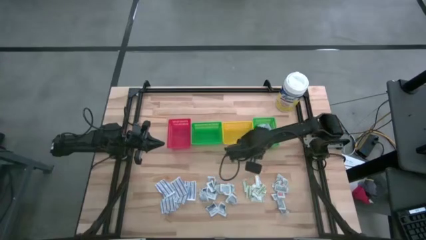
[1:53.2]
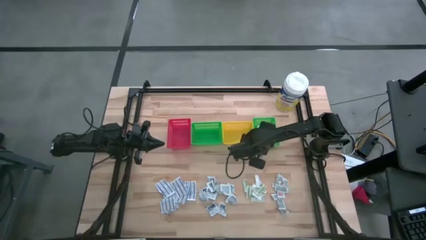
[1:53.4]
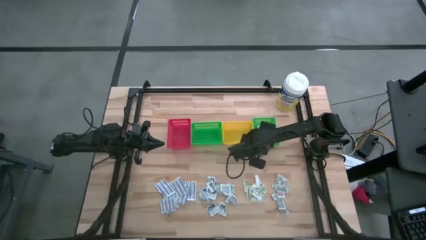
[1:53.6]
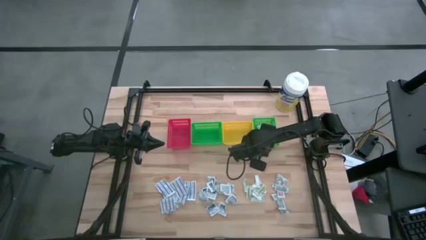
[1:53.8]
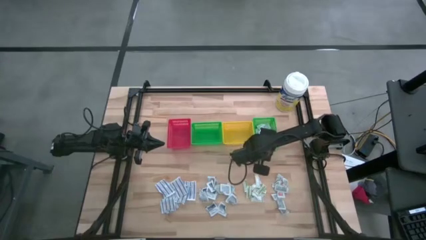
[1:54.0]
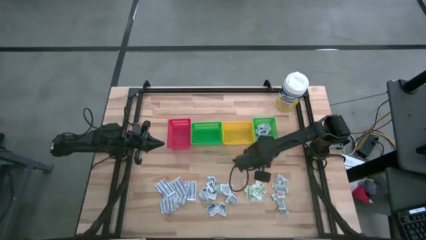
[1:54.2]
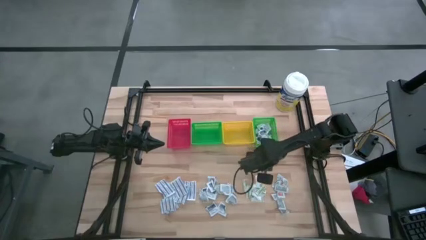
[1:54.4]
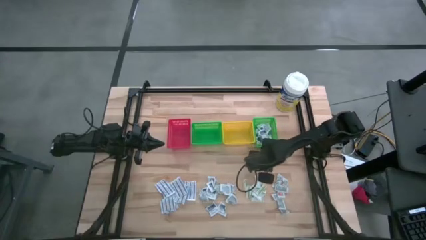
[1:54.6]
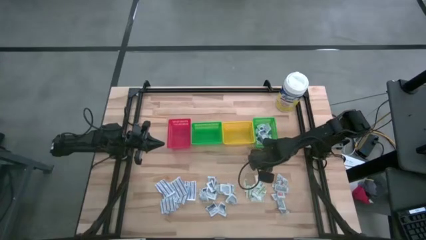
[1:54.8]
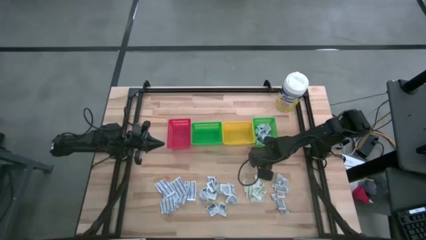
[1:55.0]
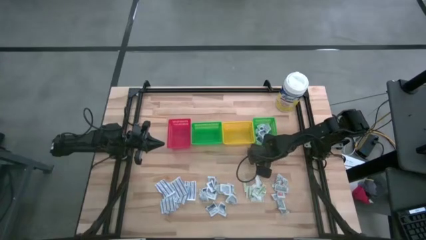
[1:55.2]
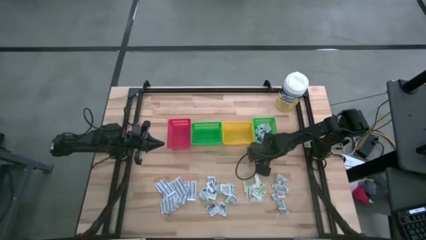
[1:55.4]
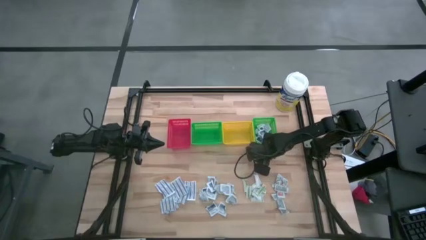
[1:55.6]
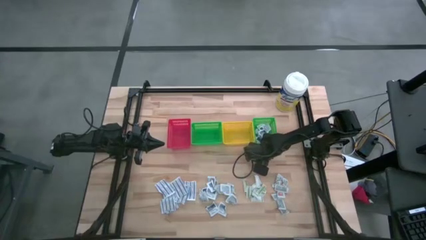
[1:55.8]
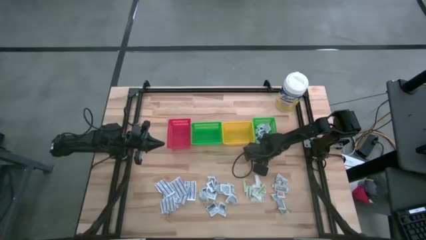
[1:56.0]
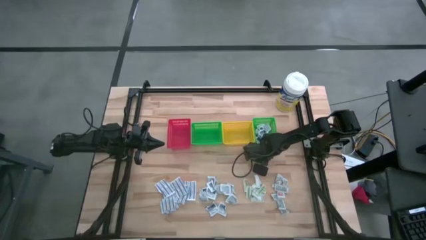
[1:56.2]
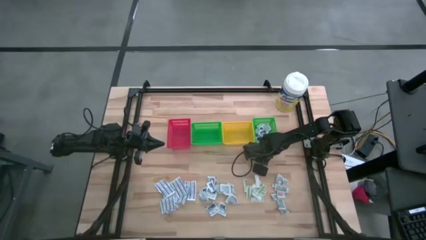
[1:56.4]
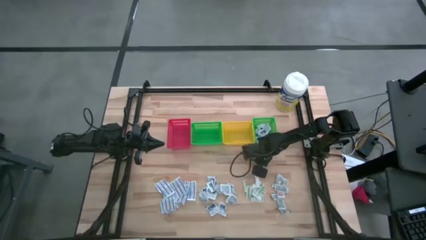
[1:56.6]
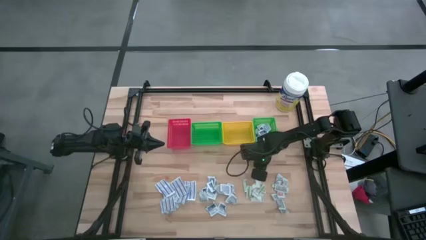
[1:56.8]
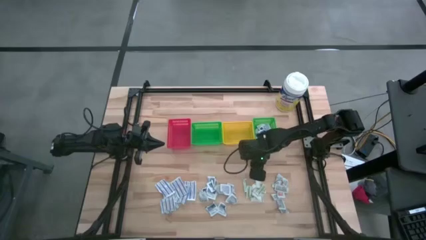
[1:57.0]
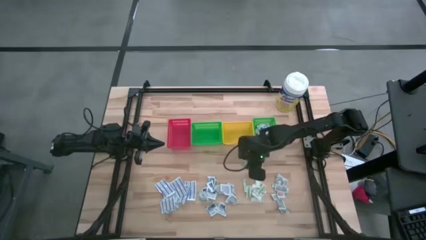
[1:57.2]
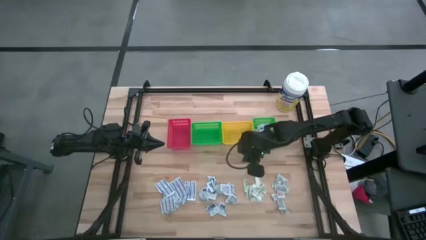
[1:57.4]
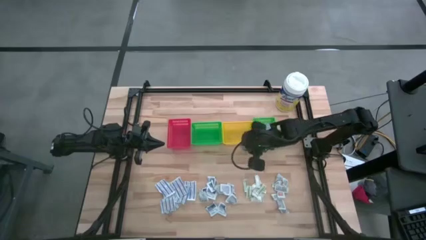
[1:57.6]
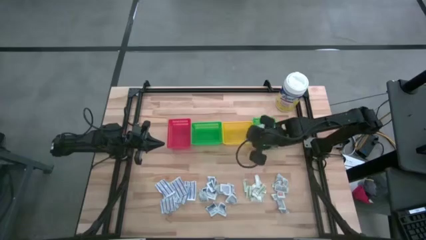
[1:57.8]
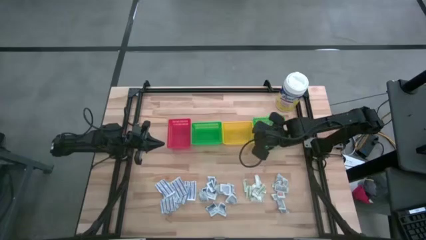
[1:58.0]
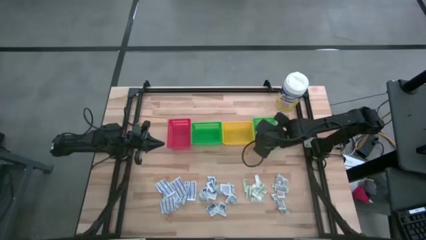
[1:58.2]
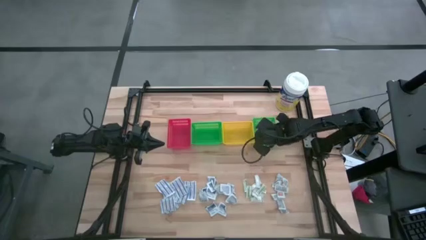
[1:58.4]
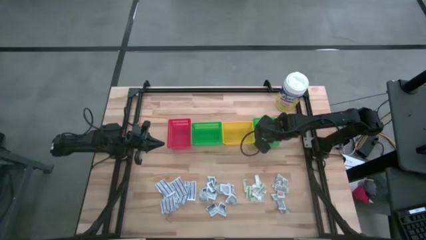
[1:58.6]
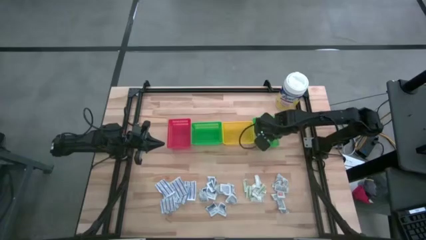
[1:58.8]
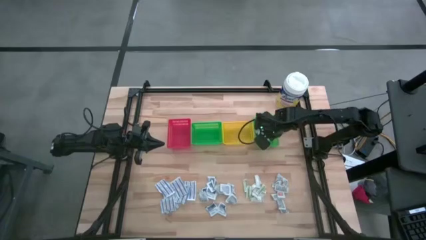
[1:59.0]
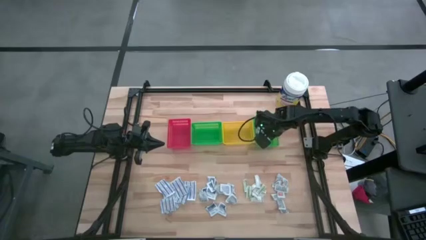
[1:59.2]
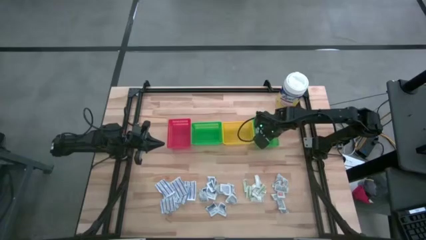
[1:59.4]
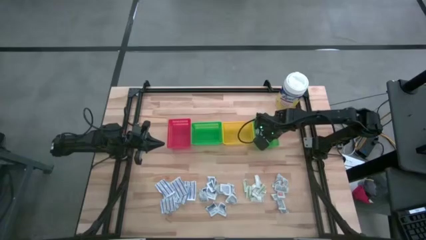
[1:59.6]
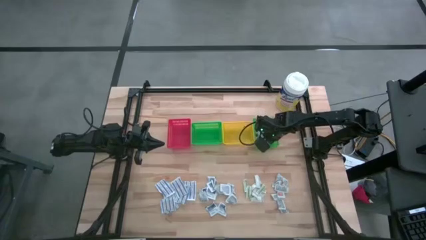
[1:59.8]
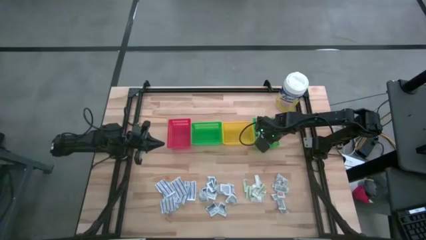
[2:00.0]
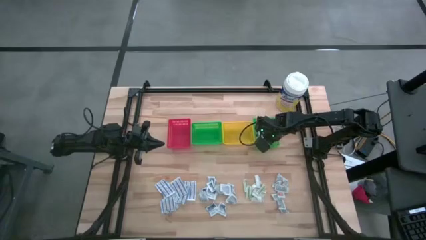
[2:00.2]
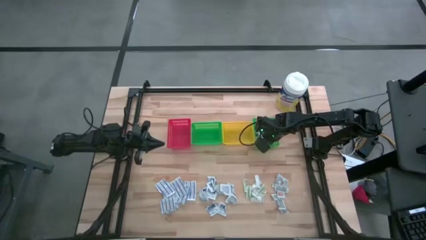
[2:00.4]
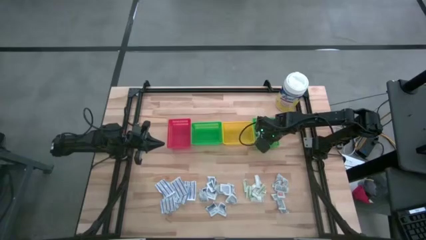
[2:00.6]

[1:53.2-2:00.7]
Task: Pick & Place First Aid Supplies
Put the blue alcohol pad into the right green bin

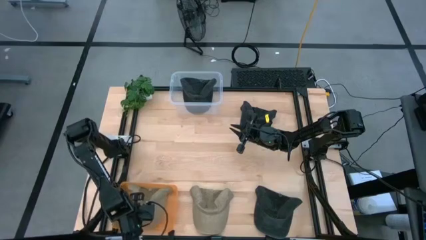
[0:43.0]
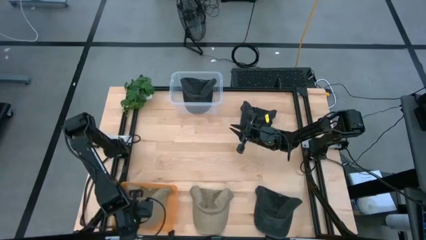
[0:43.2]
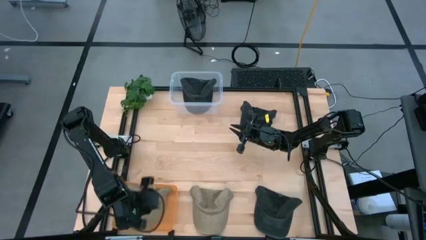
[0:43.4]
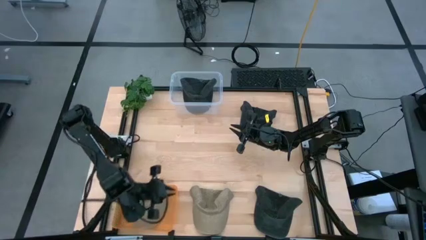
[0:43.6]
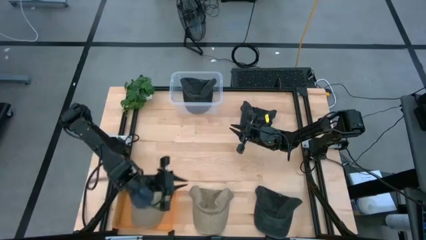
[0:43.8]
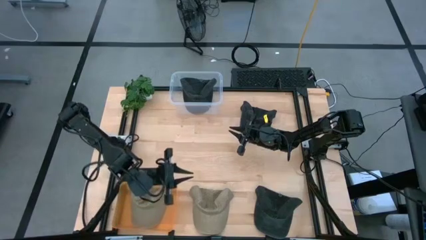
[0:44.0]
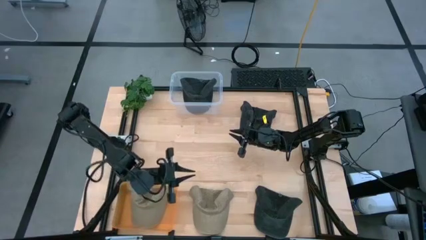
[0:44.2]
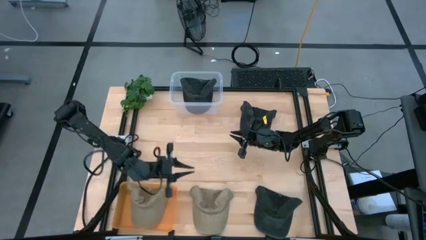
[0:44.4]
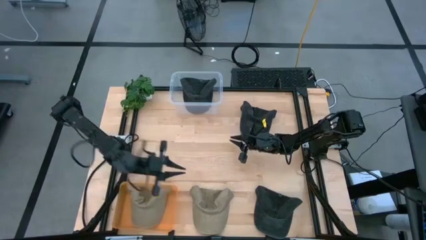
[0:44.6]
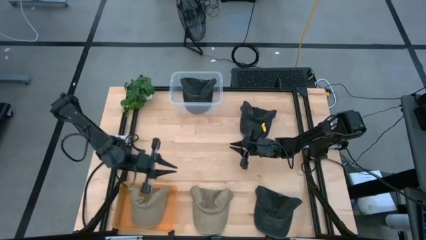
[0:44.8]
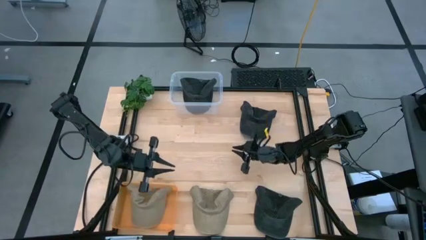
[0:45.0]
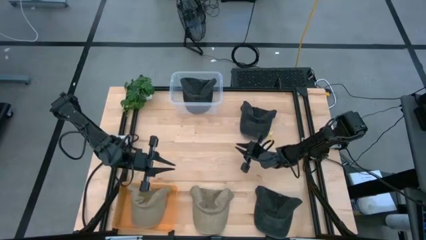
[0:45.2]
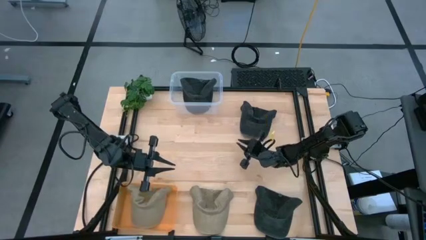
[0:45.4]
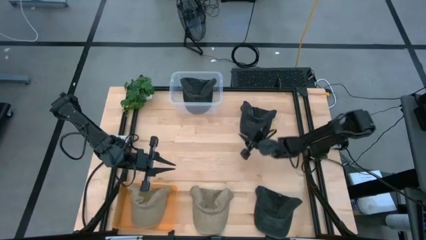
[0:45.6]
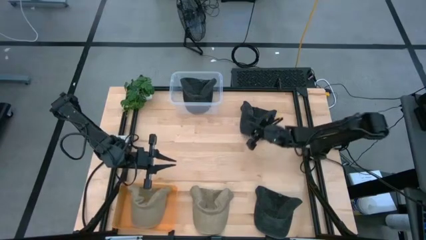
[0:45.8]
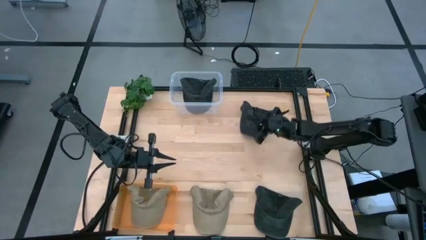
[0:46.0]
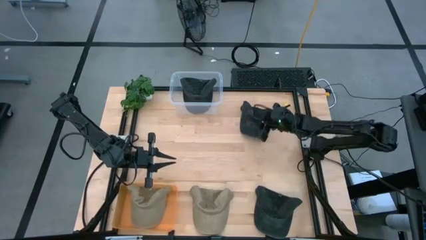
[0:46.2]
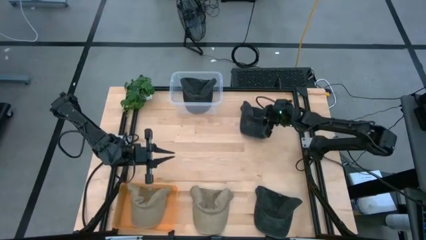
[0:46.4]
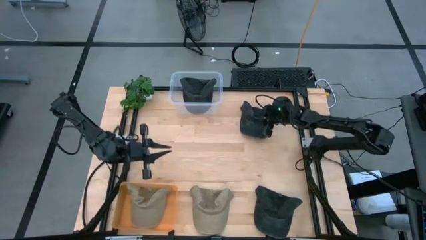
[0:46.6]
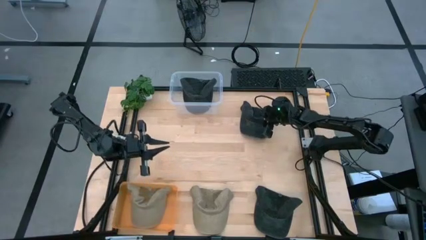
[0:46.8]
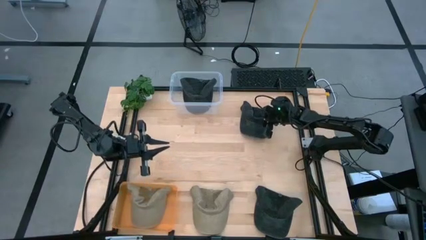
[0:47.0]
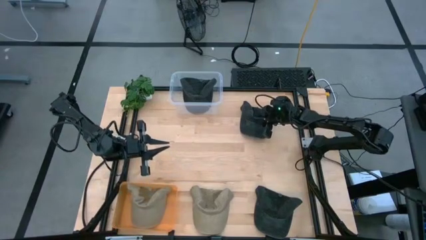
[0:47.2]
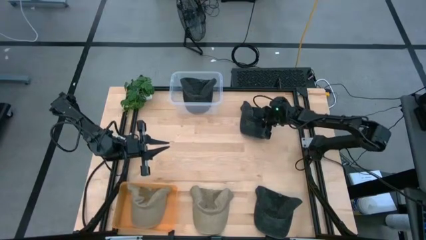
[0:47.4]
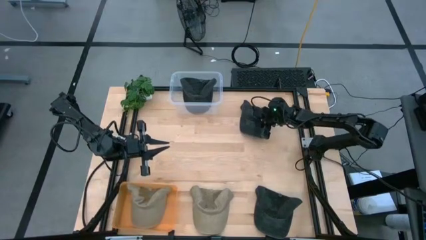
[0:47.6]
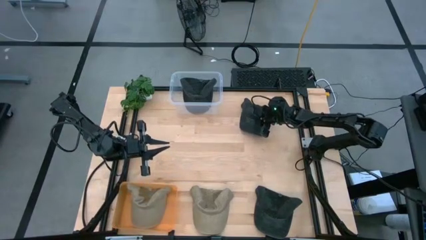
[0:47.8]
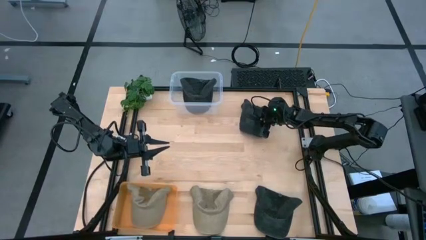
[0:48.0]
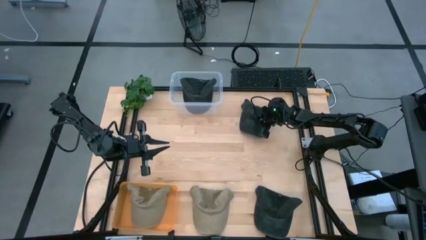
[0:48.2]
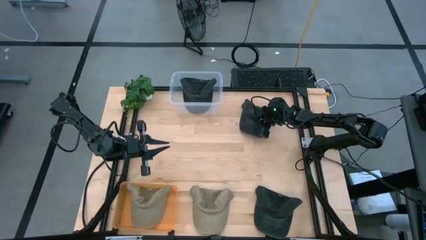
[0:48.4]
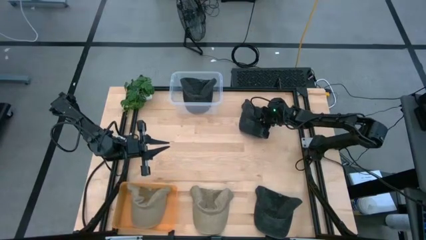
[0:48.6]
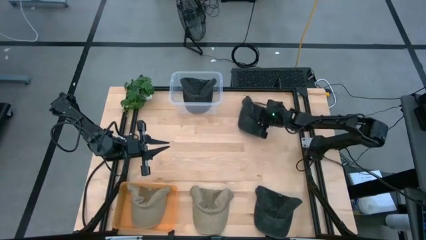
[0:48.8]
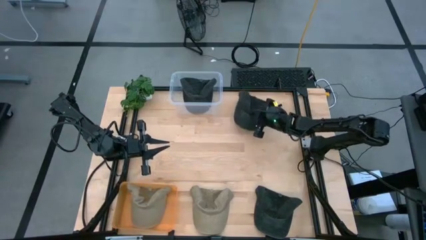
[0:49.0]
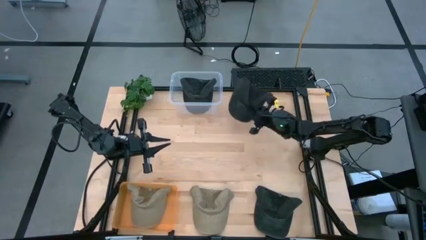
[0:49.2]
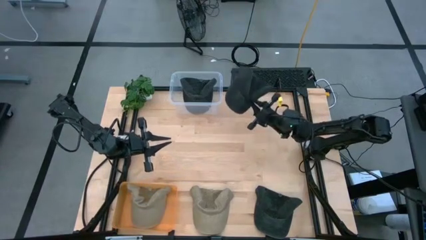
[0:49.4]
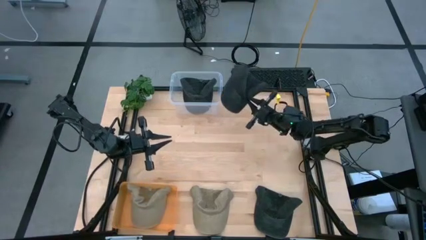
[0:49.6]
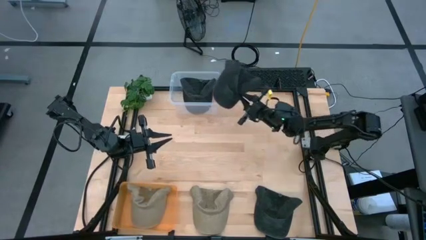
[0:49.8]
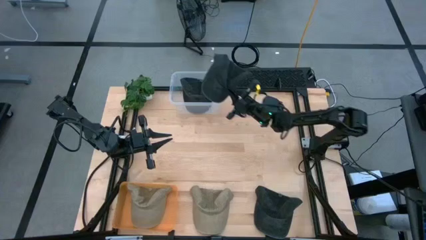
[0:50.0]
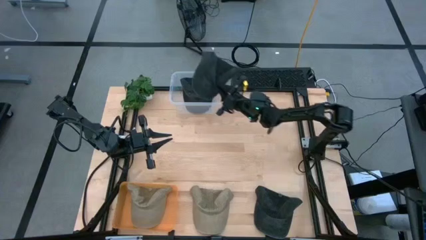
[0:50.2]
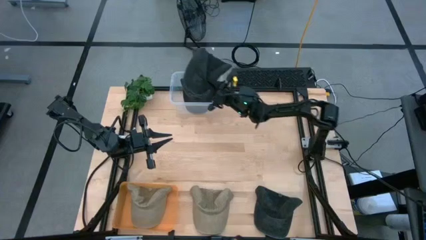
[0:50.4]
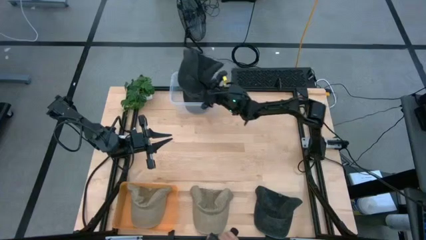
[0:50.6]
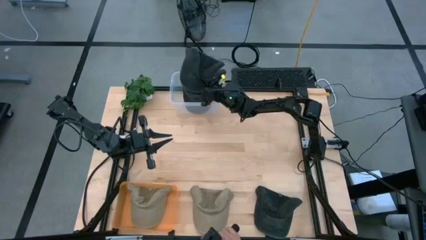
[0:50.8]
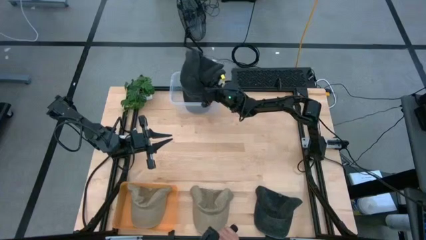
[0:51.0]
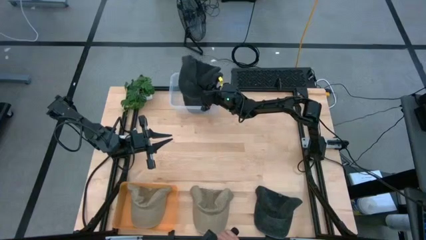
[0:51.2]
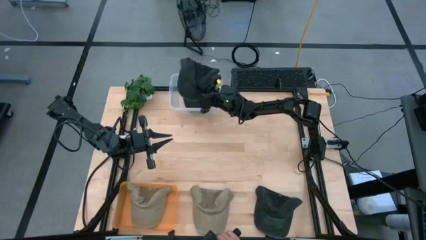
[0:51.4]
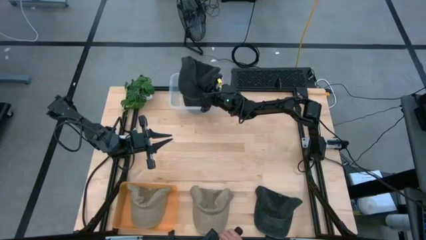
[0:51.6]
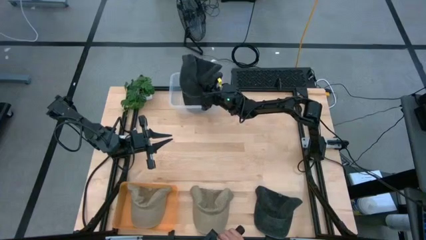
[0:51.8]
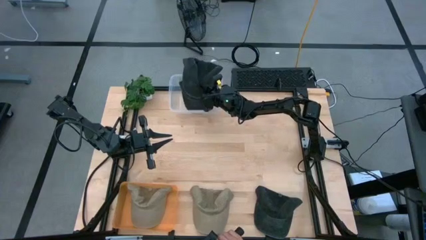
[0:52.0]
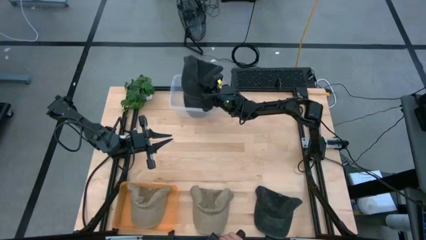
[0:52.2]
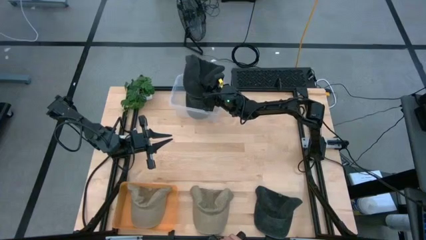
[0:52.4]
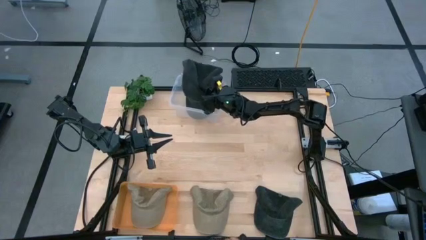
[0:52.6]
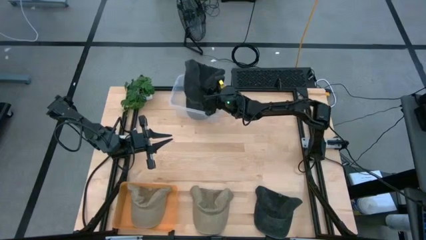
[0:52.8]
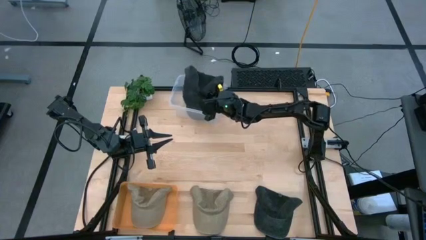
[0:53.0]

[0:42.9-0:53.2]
Task: Pick & Place hat
Put the top black cap into the transparent bin
